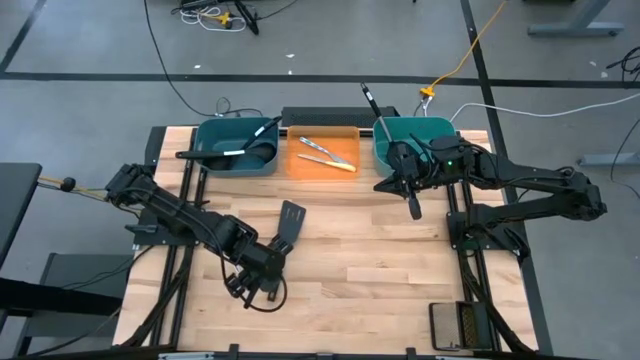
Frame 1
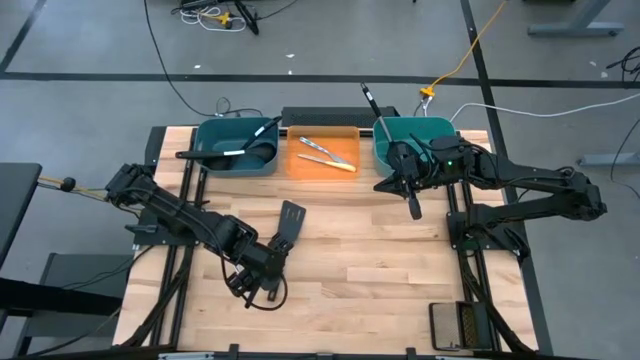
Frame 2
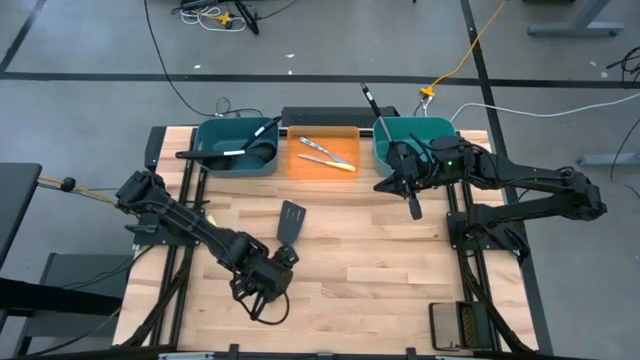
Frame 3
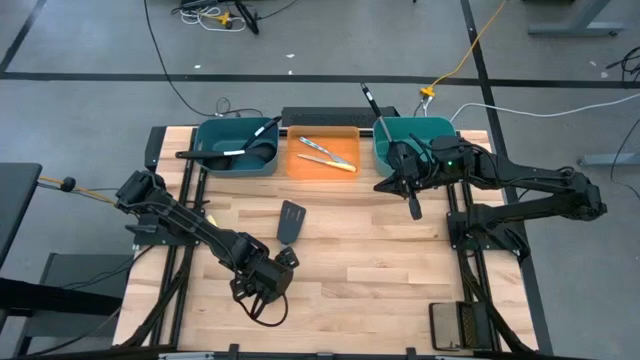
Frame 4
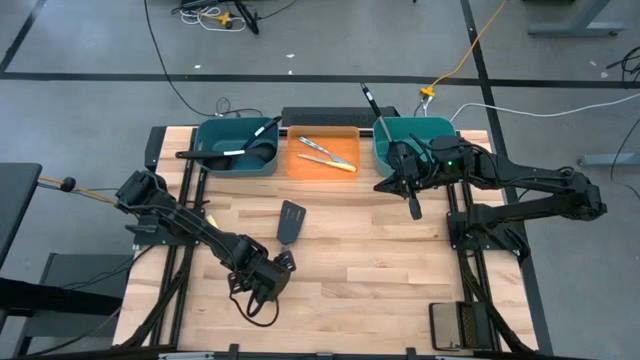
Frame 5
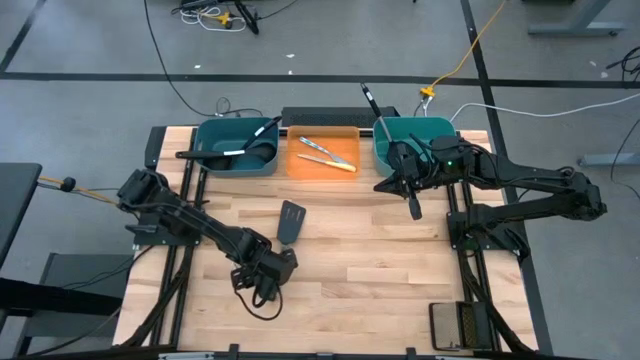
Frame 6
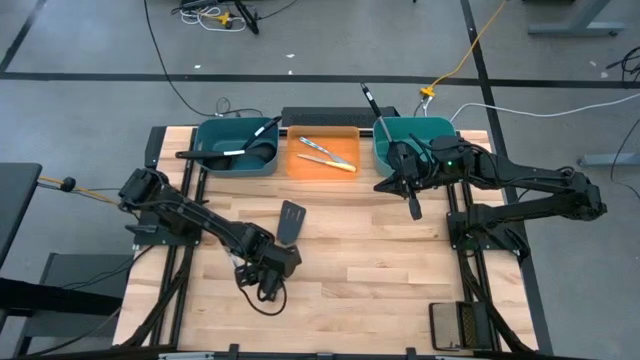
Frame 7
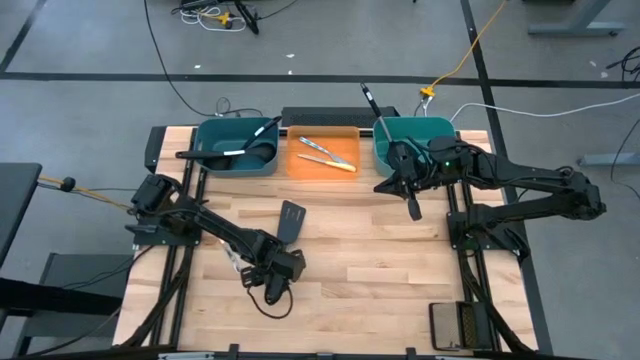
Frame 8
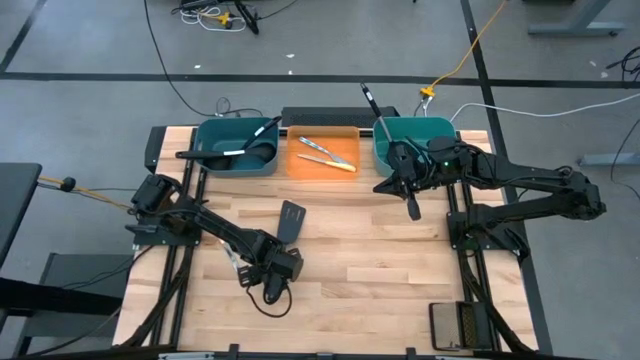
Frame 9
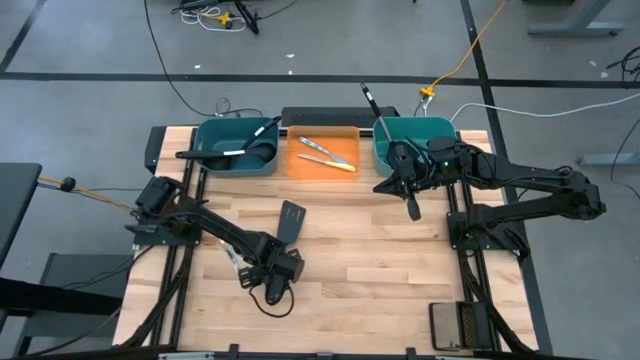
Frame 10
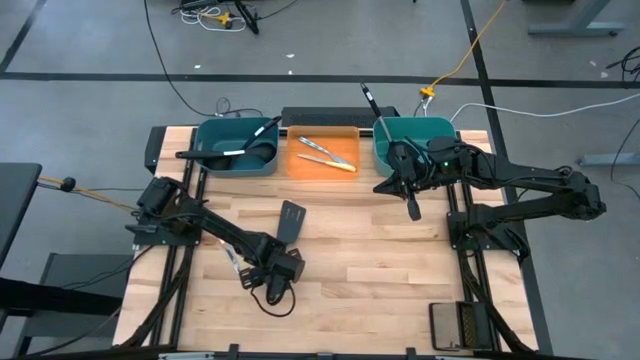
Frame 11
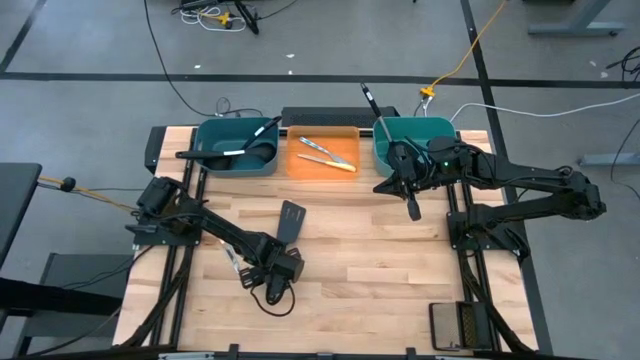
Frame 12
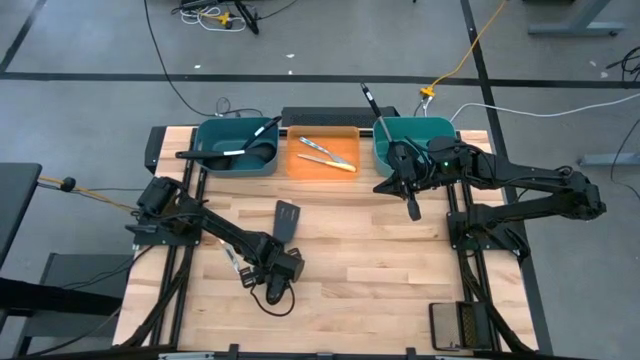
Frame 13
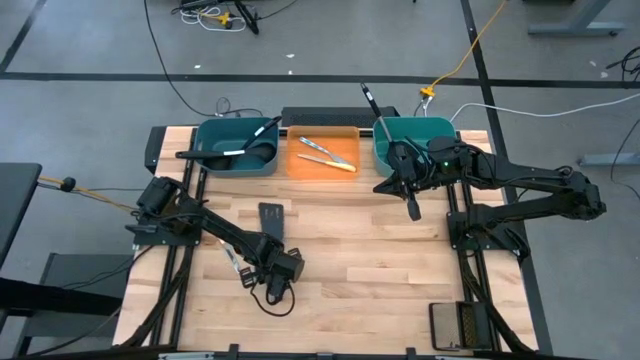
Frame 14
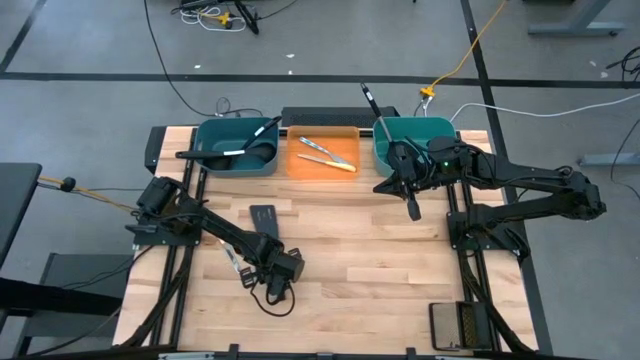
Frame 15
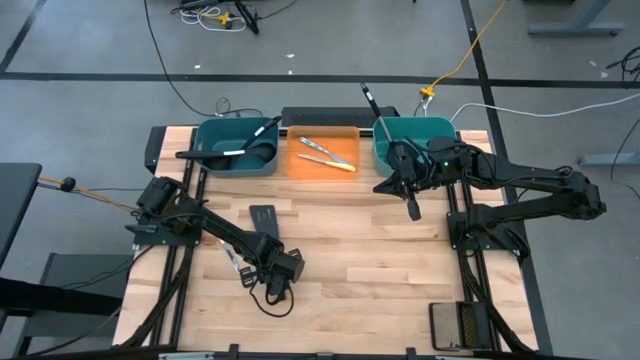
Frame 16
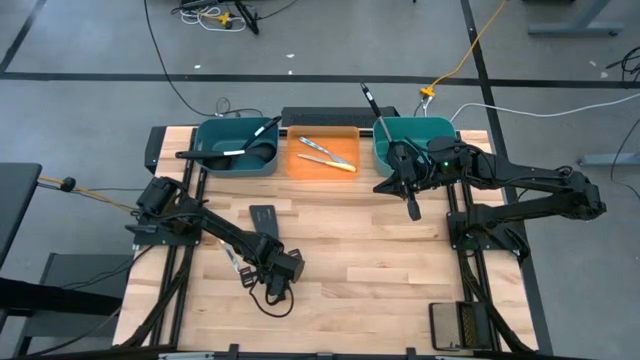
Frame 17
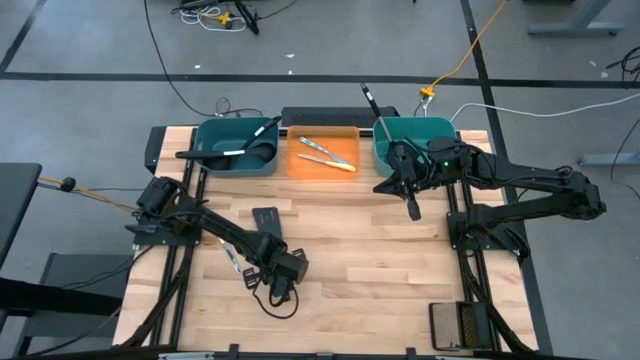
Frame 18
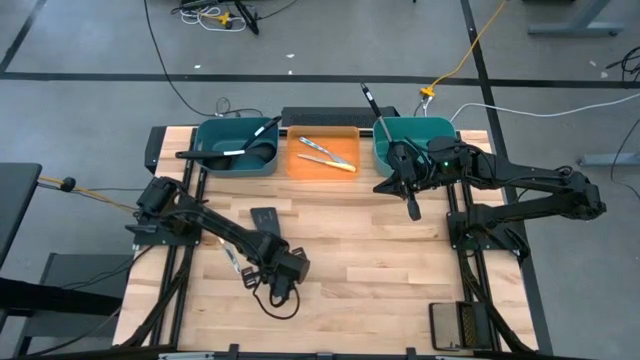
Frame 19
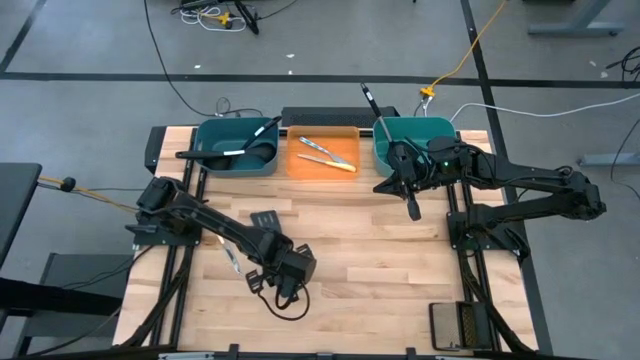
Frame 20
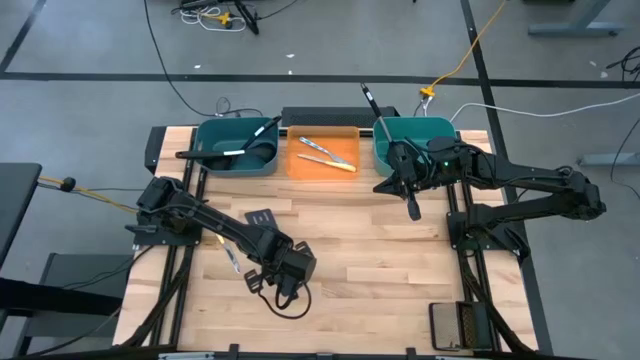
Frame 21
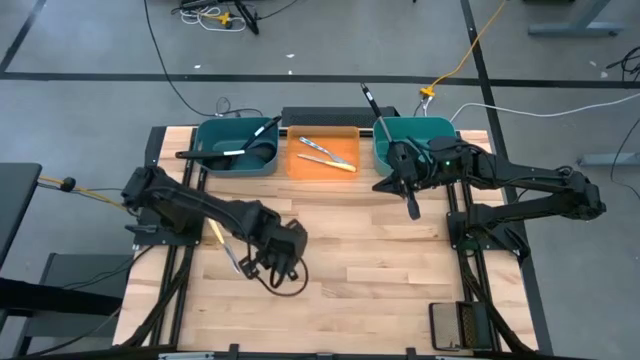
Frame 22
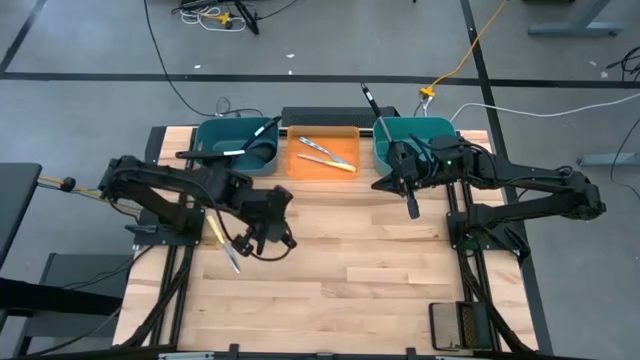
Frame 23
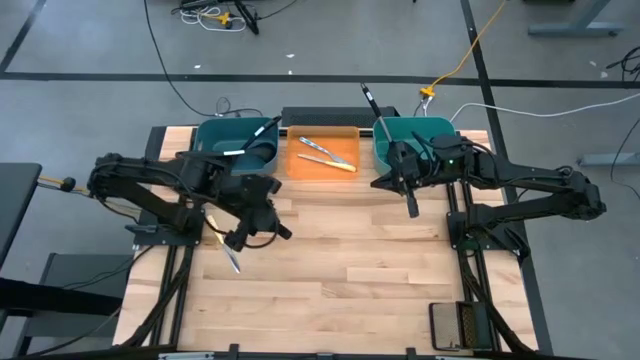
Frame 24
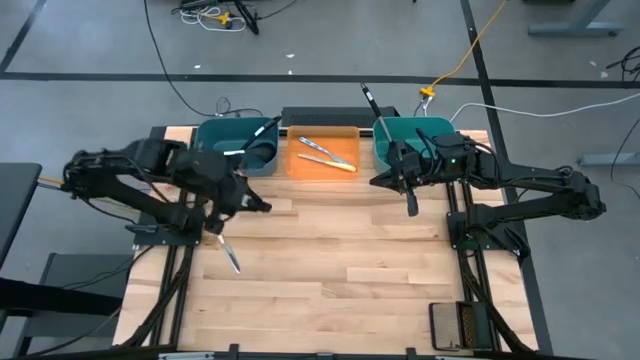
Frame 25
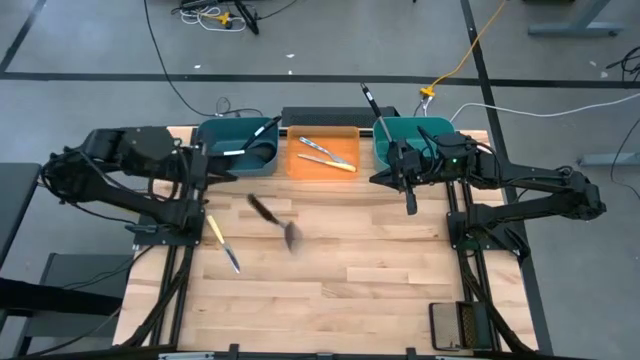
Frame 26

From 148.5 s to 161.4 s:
Task: Pick & Place Kitchen Items
Put the black spatula into the green bin

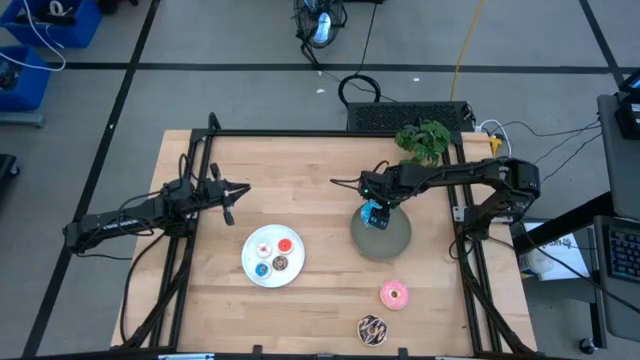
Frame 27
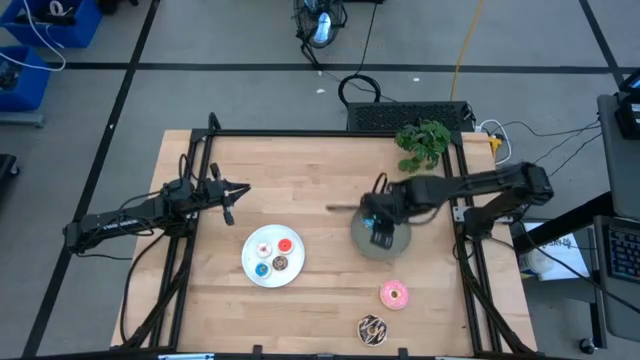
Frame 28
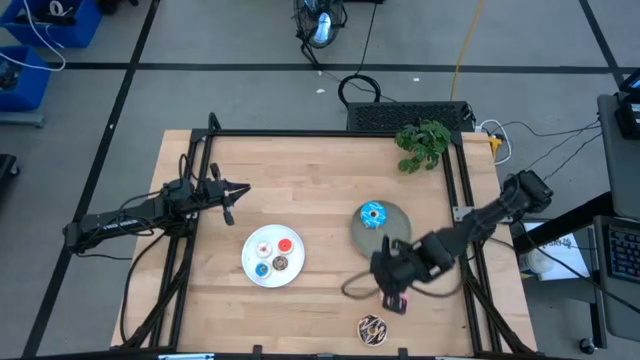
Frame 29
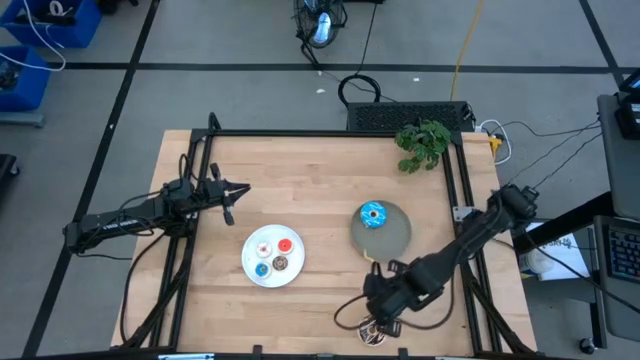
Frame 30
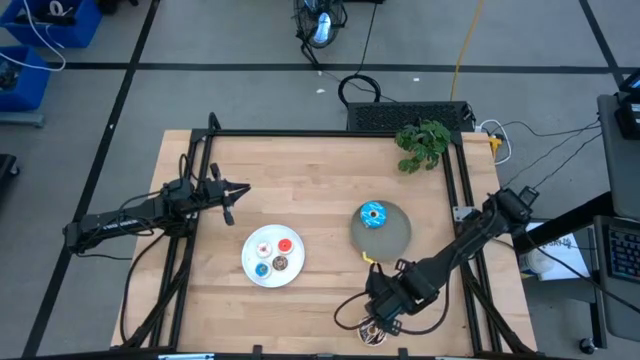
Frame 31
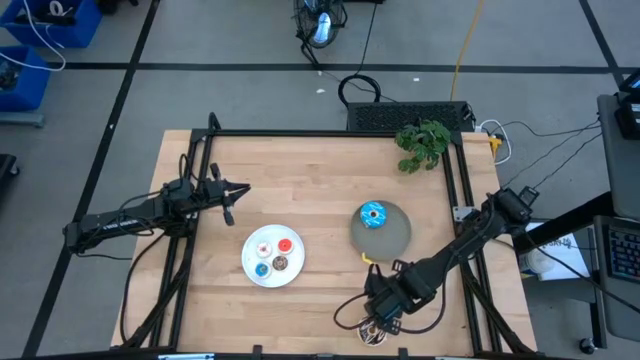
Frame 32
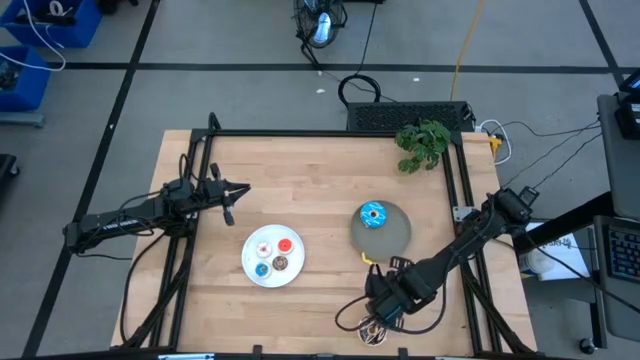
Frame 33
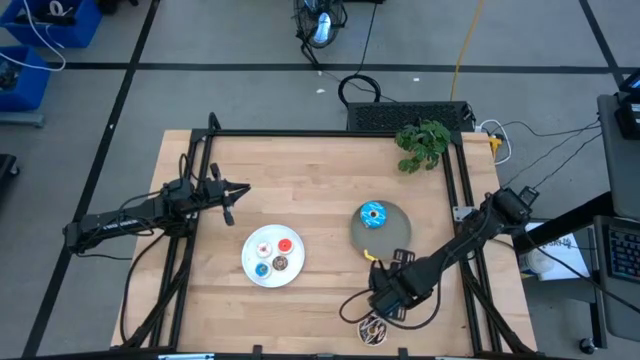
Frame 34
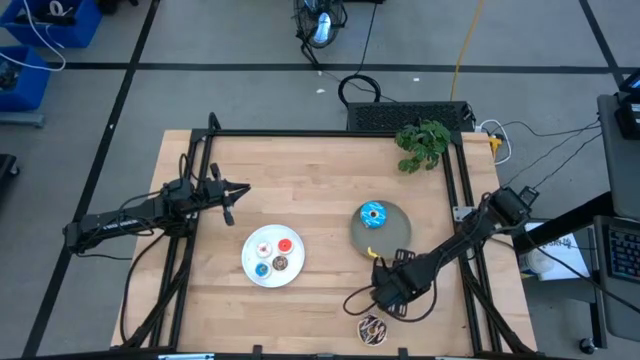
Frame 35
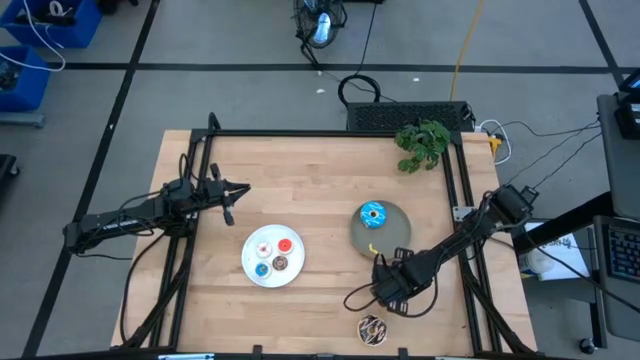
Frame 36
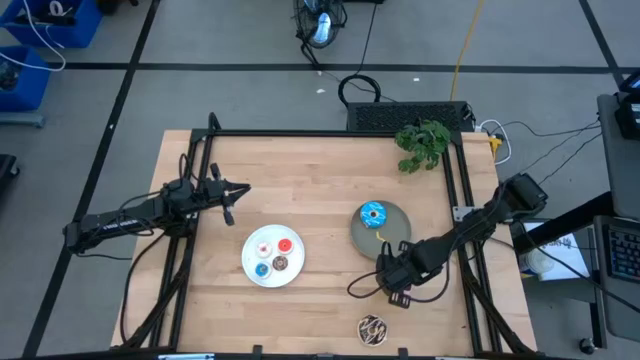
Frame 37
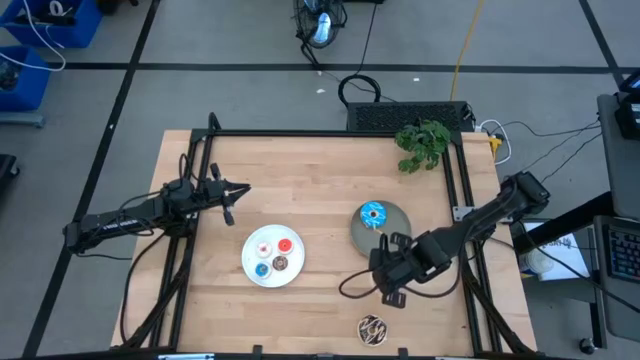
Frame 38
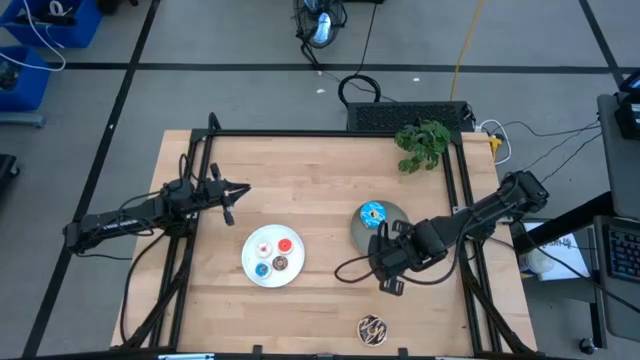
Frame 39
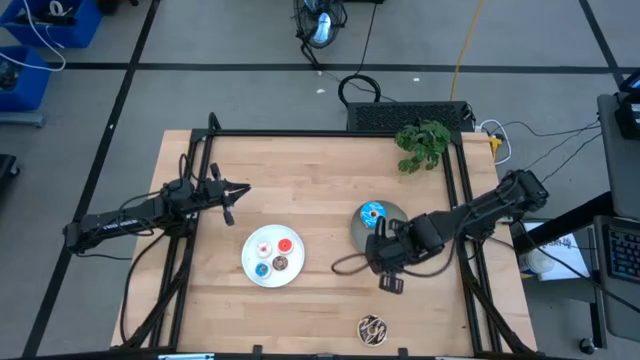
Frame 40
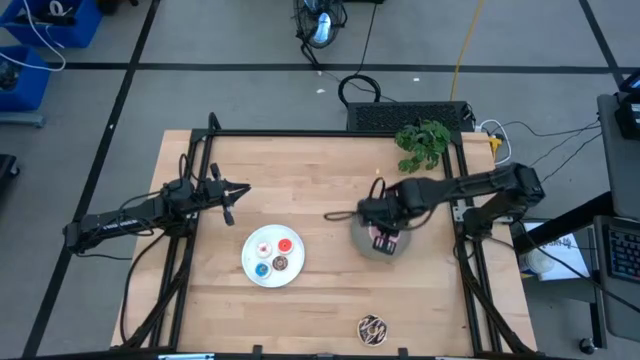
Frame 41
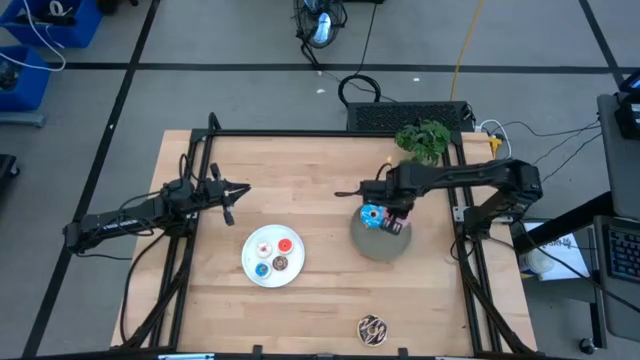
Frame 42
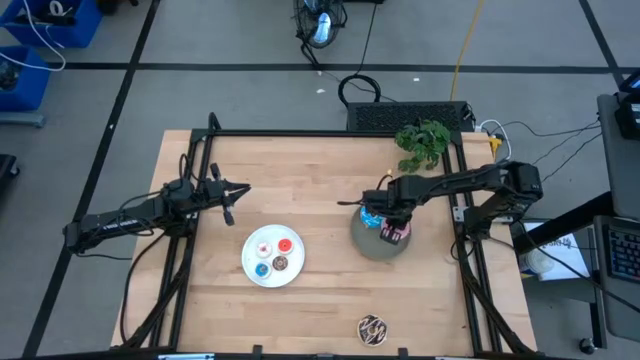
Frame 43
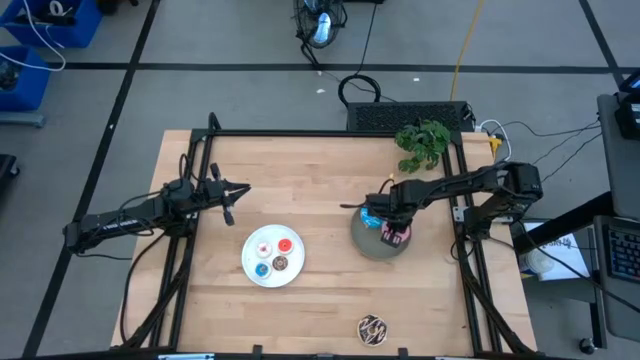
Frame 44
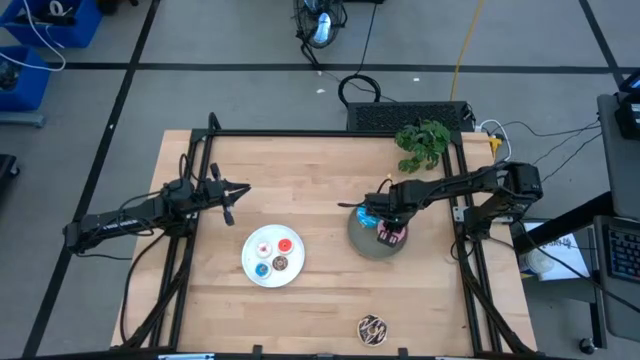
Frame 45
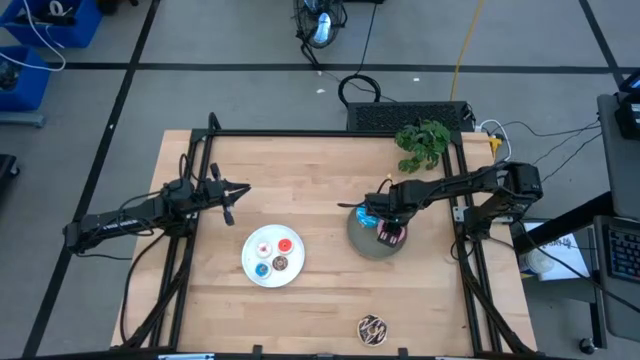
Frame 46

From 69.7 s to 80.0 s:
Task: Pick & Place donuts
Put the big pink donut on the gray plate
